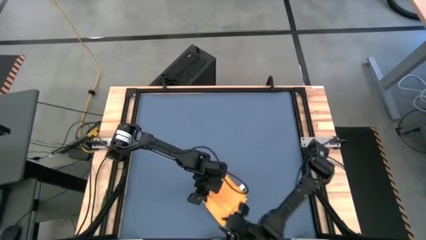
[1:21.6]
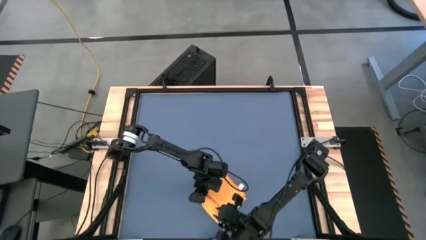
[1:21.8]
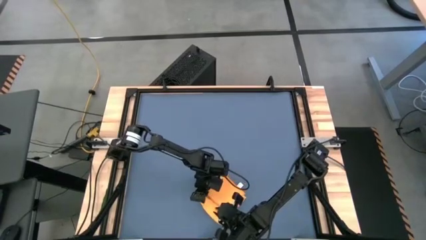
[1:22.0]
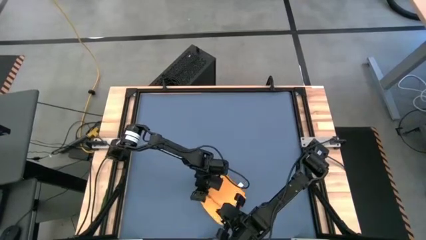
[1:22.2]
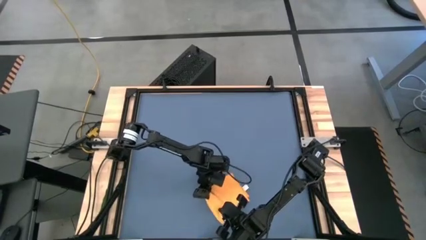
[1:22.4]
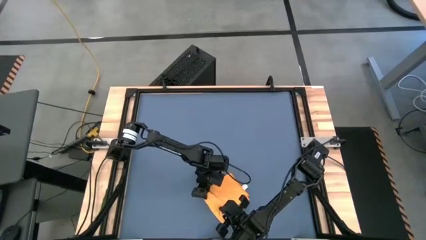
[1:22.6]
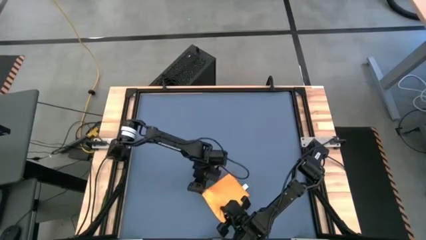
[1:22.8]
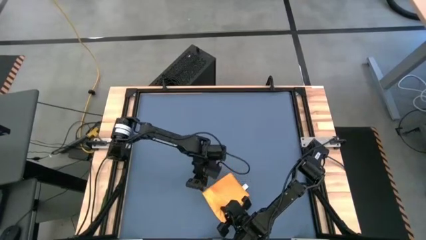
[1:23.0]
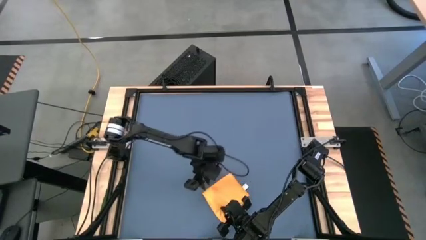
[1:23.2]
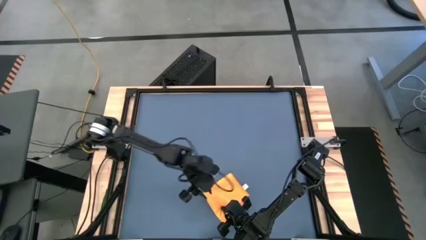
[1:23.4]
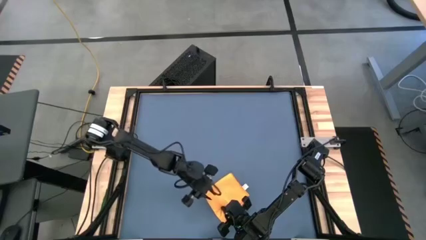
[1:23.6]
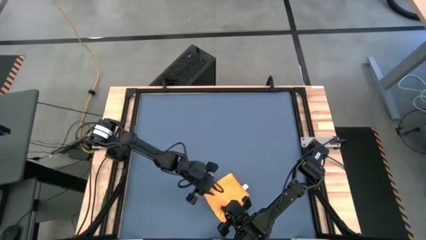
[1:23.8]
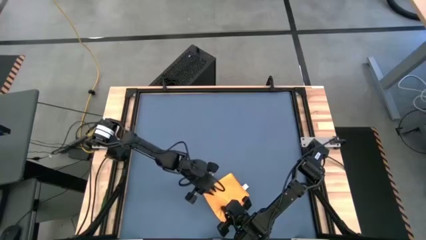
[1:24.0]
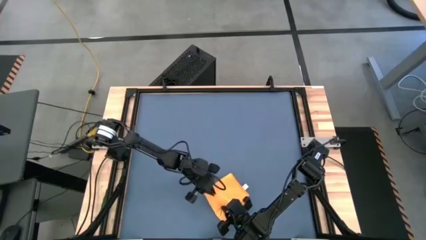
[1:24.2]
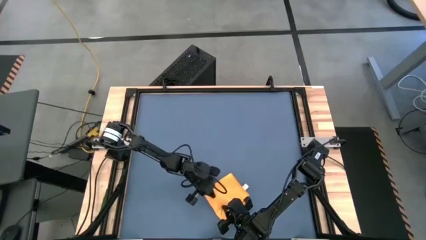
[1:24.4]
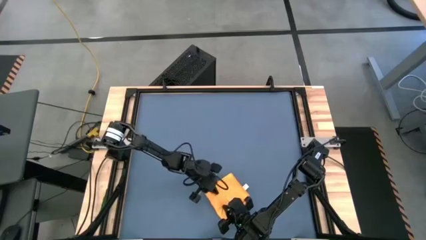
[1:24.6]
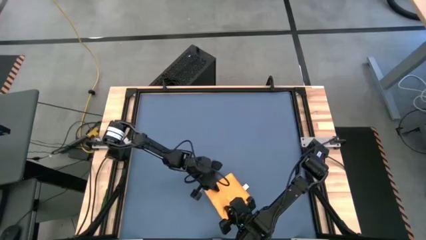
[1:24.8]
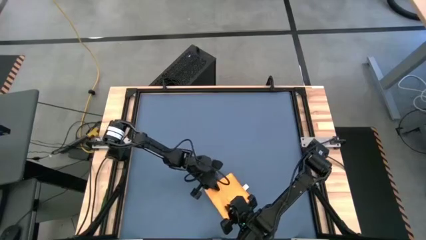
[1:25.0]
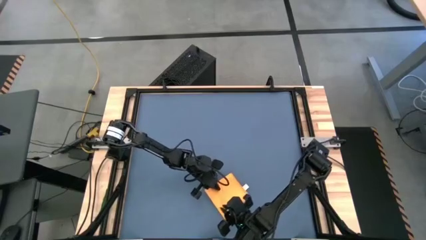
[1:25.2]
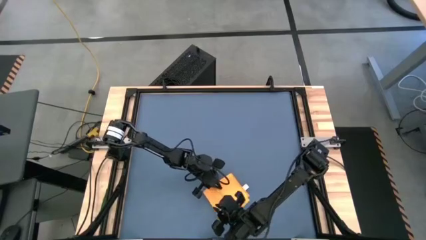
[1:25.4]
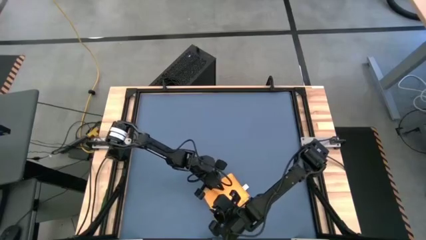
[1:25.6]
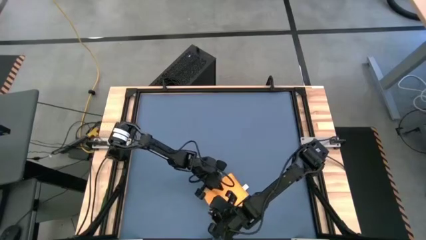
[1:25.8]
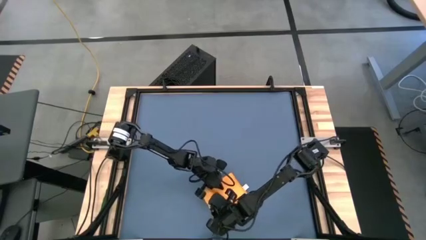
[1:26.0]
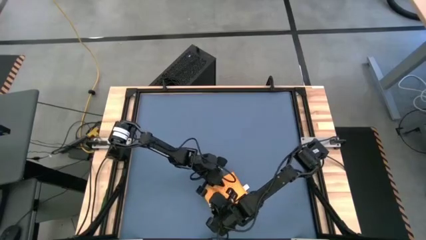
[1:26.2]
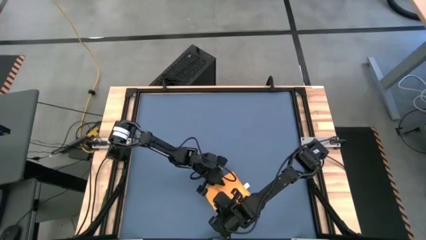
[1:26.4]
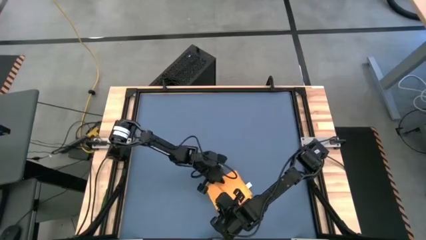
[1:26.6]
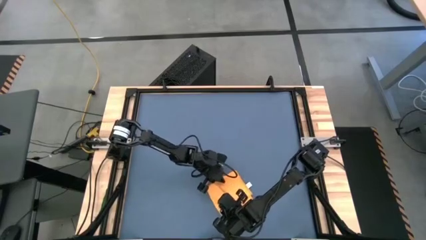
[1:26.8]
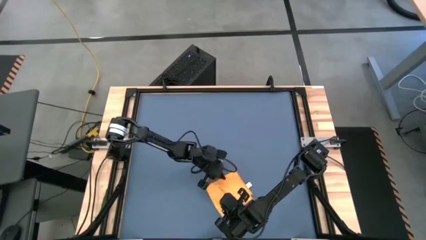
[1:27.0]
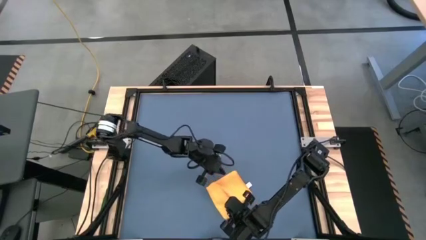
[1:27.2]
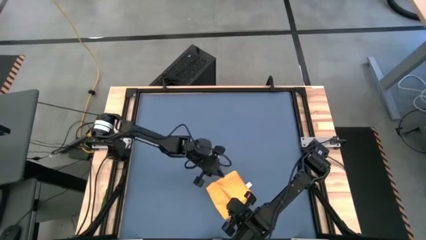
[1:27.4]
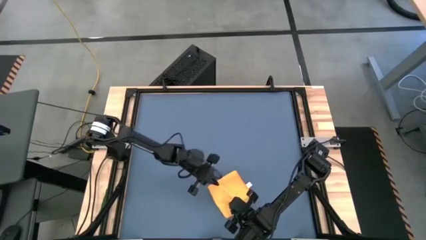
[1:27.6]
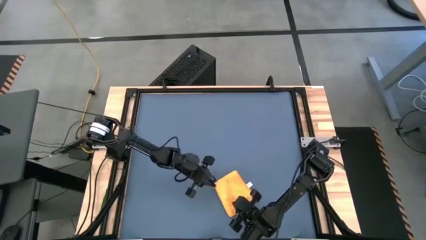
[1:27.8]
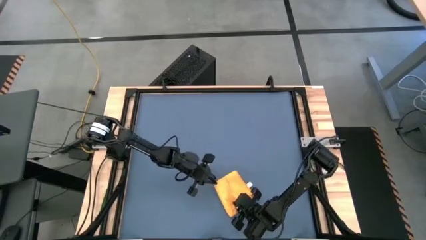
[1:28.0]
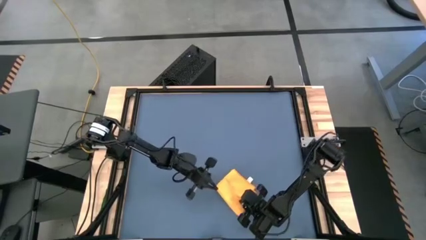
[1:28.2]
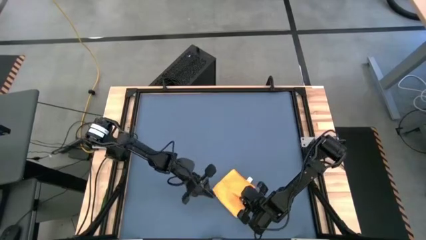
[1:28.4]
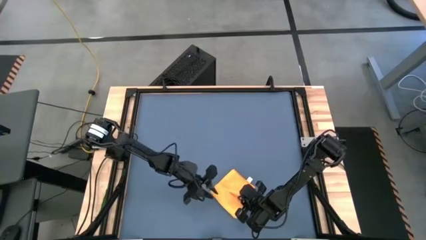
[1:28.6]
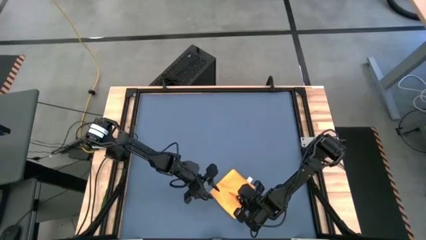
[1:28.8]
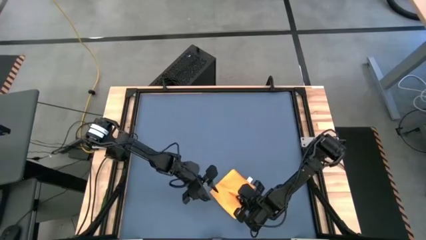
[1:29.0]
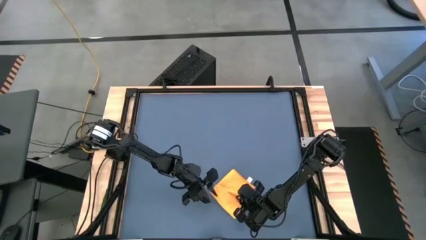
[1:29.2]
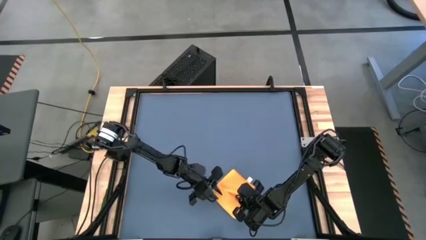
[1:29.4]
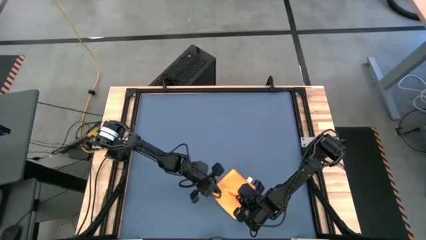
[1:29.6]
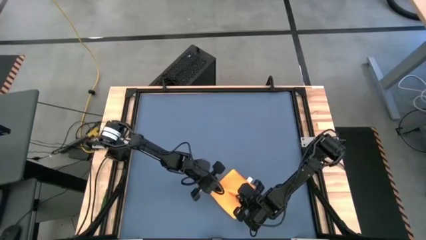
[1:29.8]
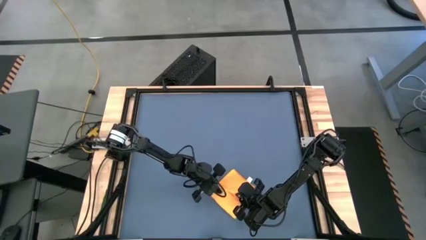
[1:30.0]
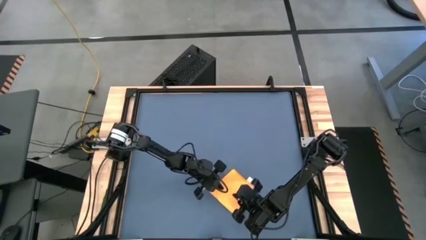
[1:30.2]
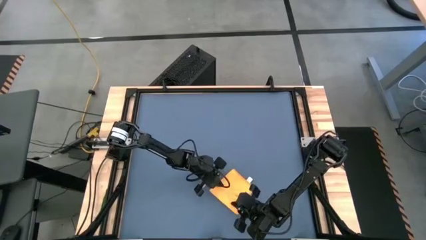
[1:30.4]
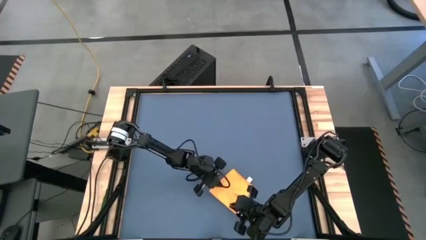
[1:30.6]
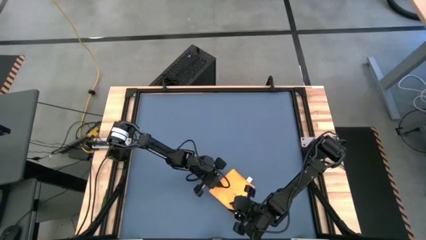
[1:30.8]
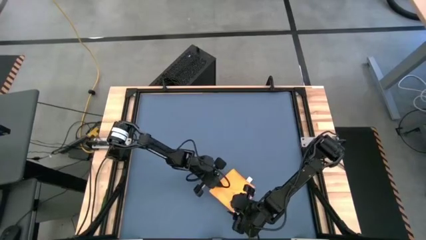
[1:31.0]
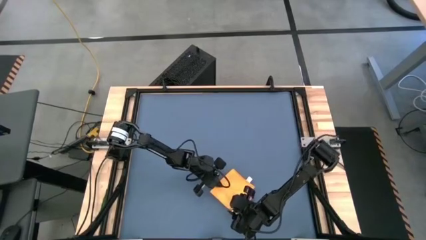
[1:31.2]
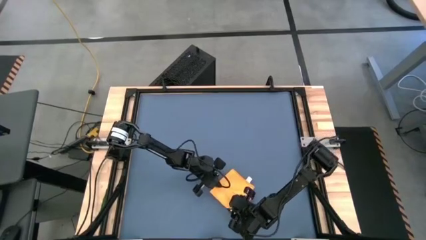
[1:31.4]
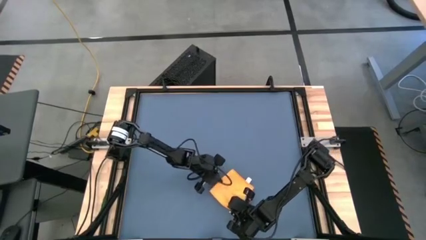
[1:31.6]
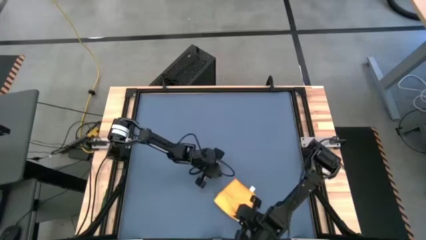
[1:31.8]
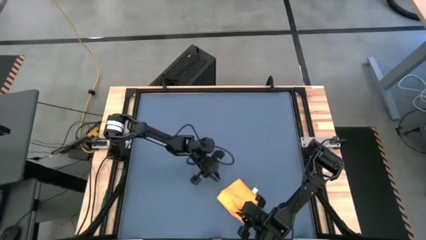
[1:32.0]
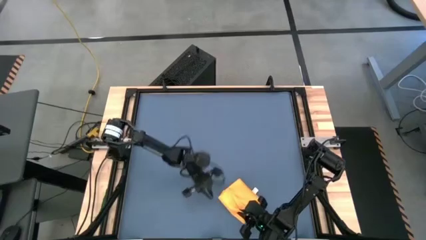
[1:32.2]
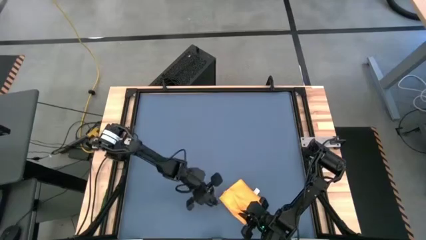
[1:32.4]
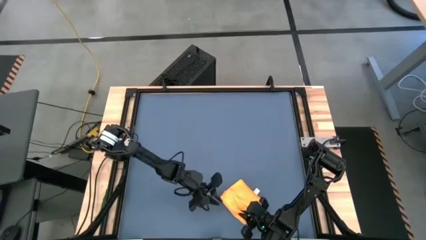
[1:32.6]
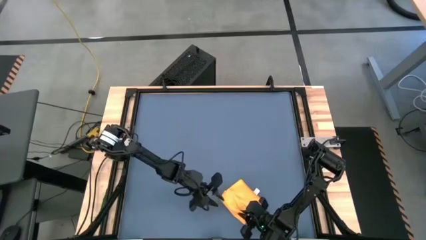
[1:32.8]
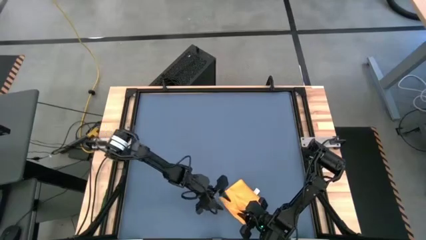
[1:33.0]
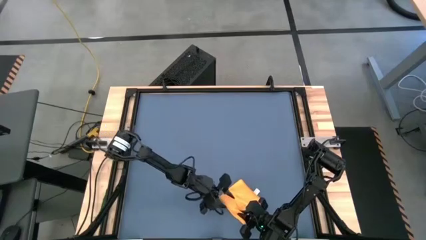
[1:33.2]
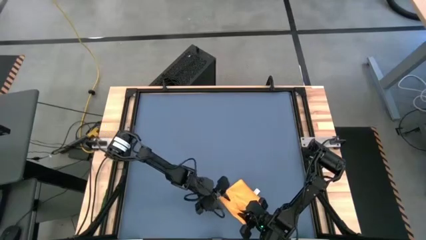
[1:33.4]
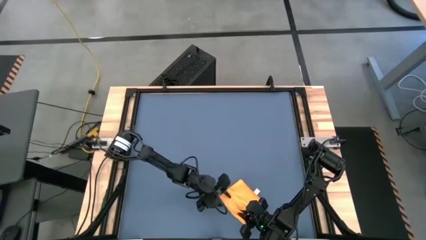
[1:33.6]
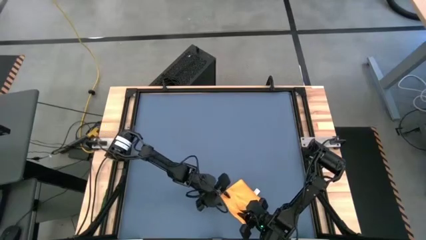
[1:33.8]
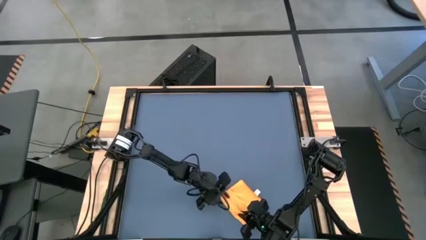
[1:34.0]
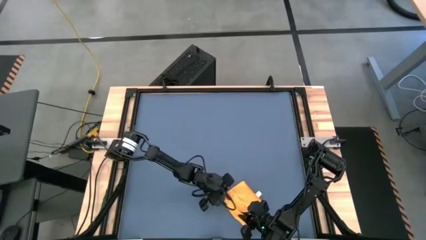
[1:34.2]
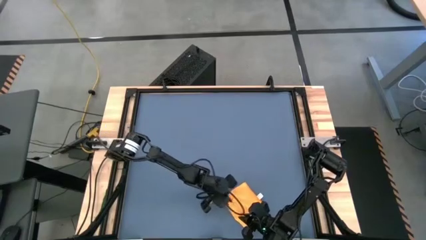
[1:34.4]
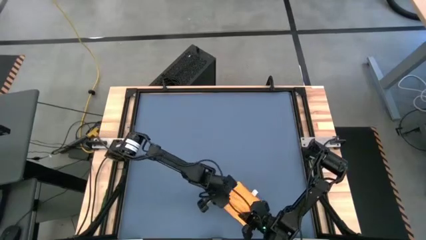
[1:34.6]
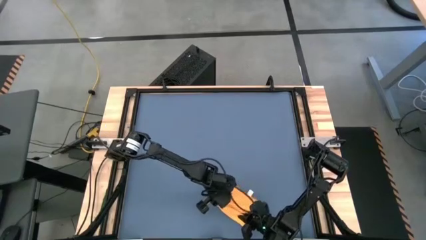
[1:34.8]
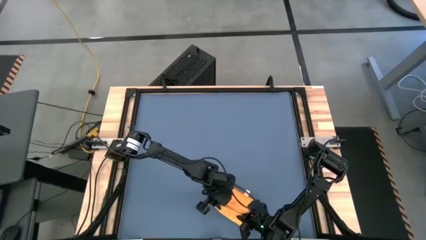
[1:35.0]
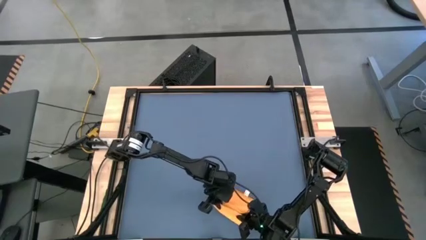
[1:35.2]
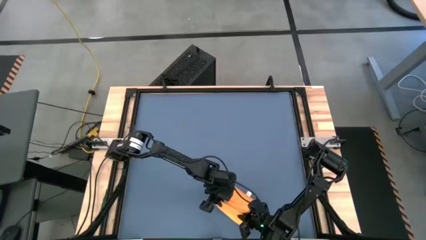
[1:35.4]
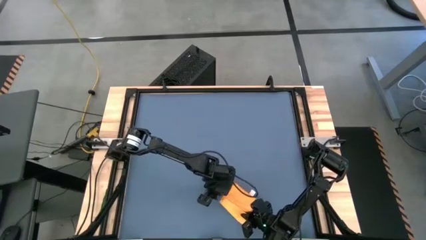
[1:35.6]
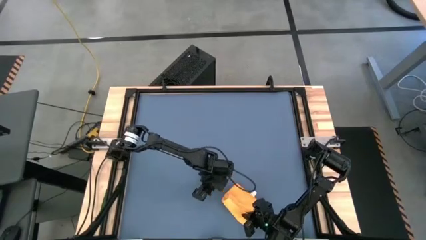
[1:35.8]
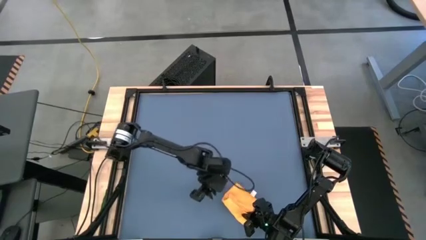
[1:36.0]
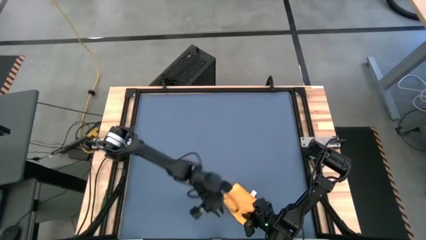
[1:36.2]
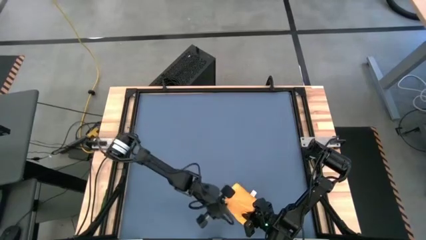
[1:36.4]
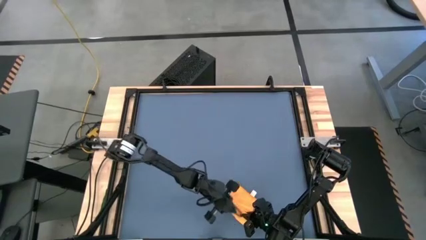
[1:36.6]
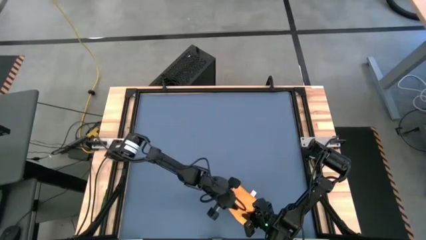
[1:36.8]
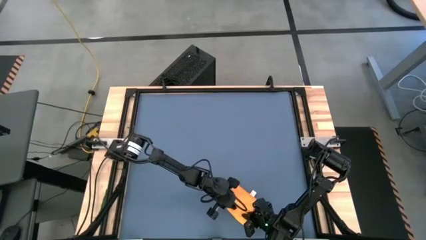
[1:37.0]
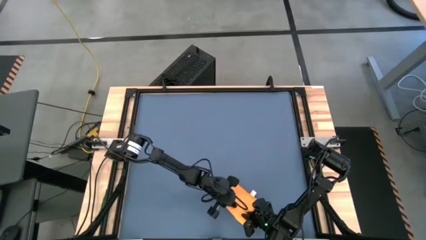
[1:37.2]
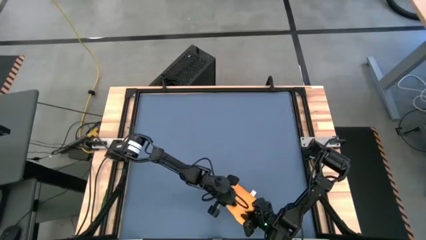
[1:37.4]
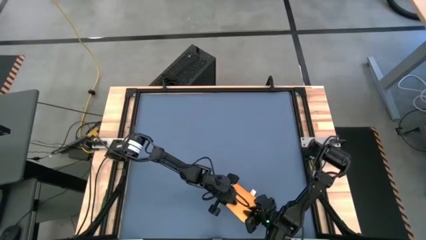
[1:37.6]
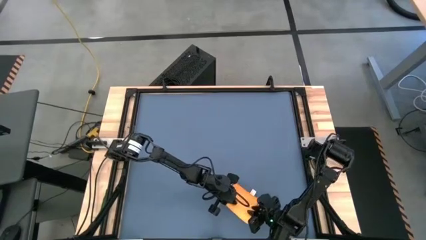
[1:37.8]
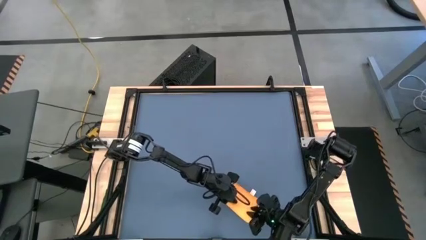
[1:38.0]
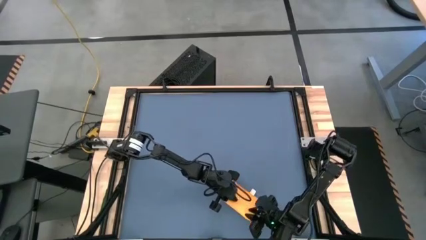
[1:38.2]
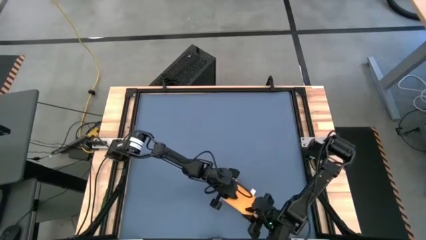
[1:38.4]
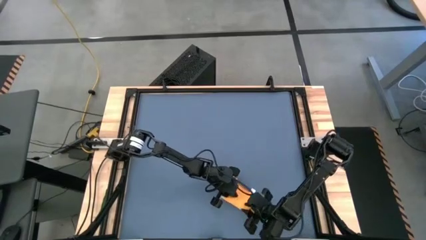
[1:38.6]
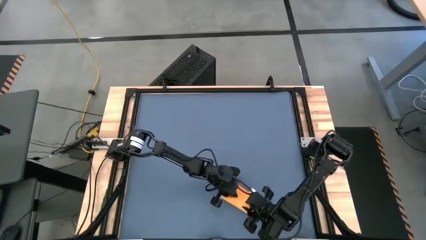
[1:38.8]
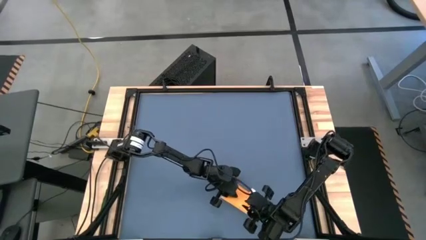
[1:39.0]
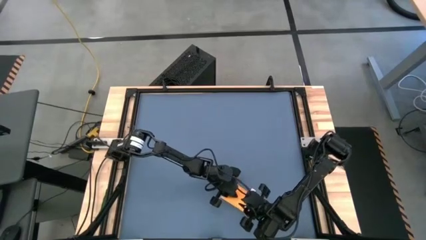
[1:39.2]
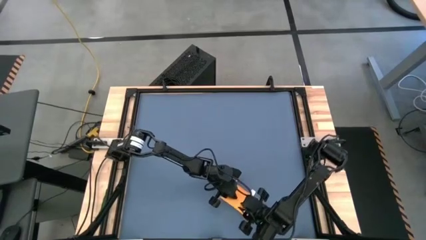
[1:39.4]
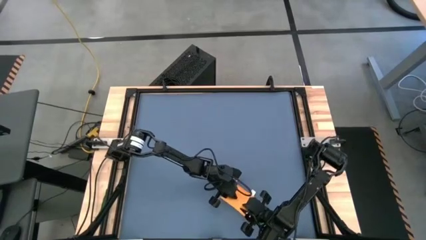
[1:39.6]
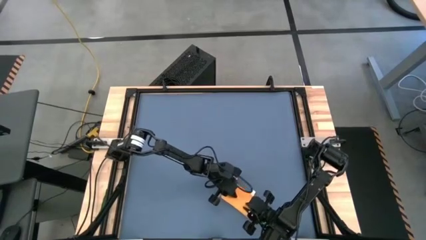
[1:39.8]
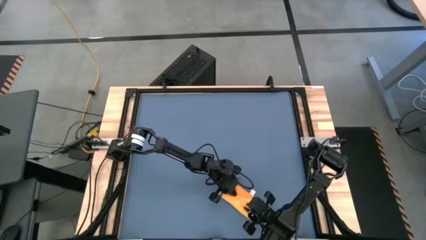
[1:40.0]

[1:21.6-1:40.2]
Task: Roll towel
Roll the orange microfiber cloth
